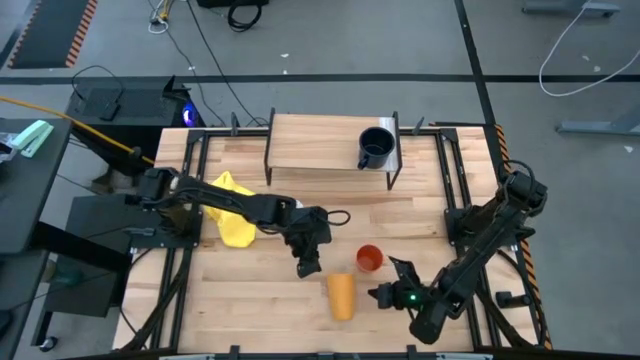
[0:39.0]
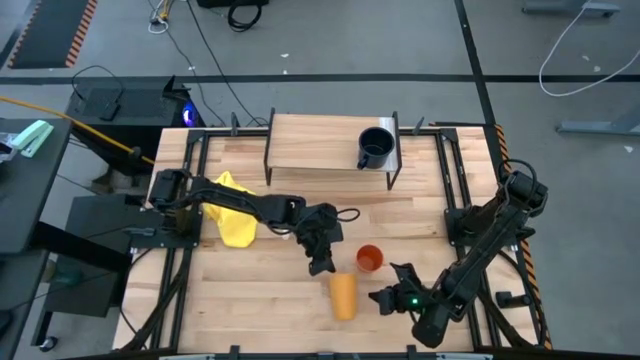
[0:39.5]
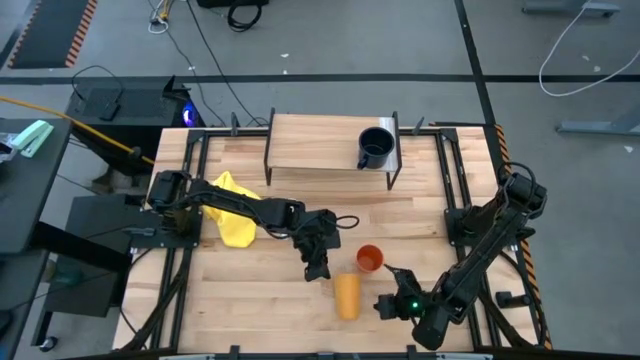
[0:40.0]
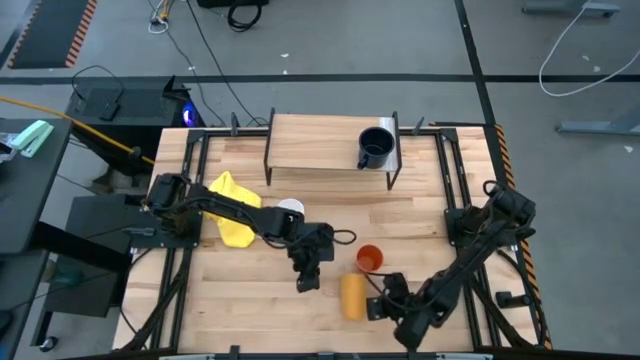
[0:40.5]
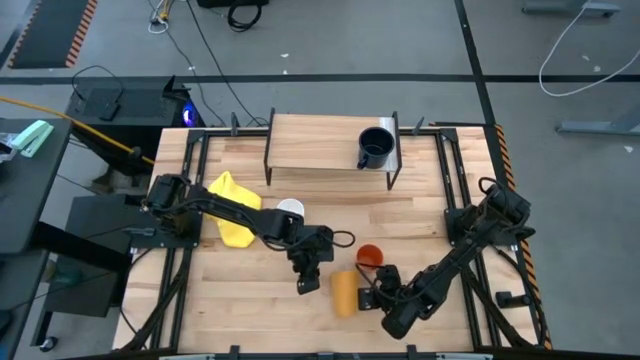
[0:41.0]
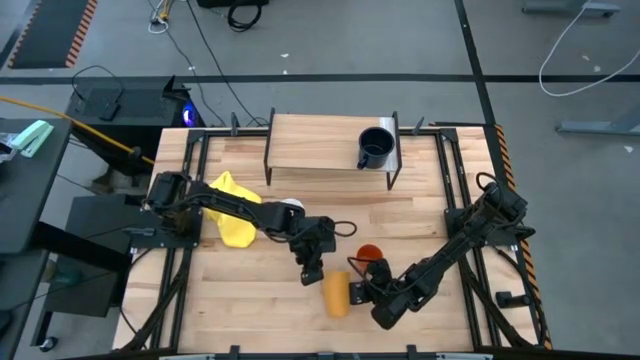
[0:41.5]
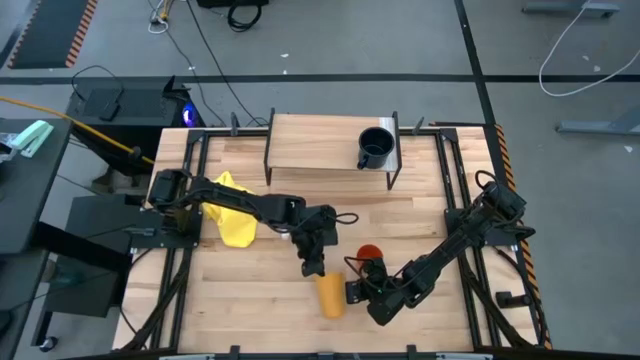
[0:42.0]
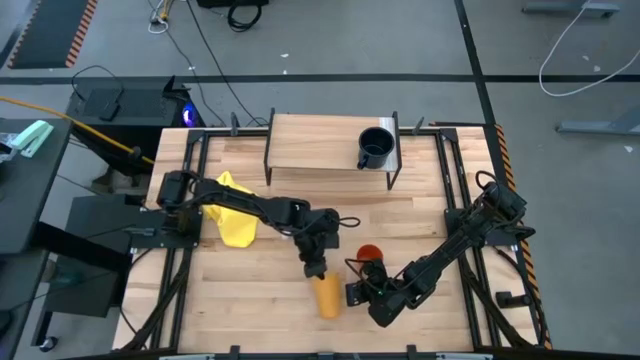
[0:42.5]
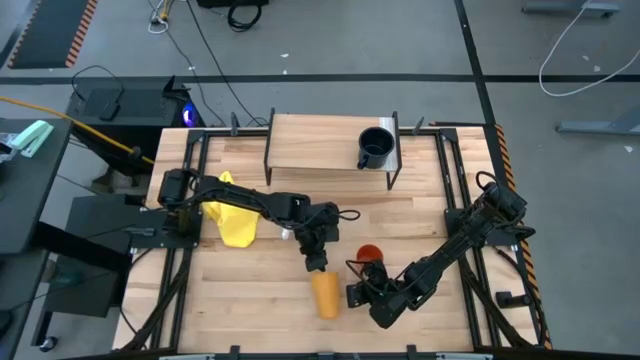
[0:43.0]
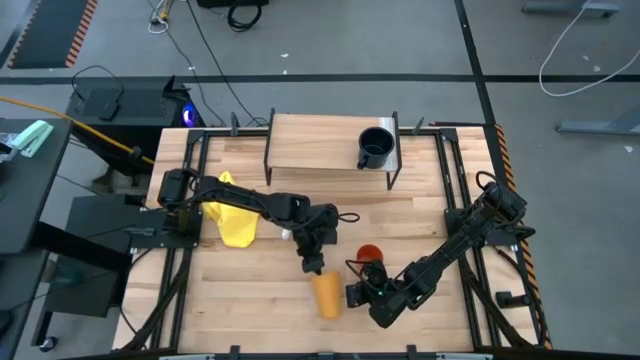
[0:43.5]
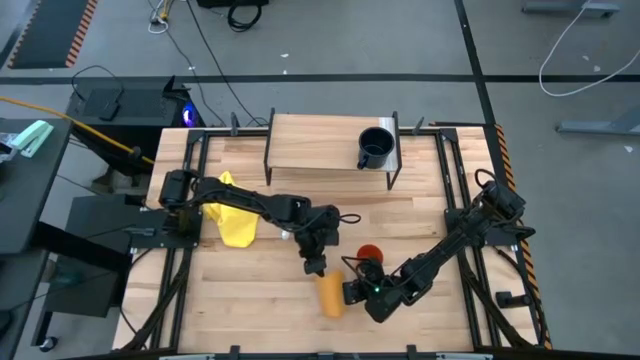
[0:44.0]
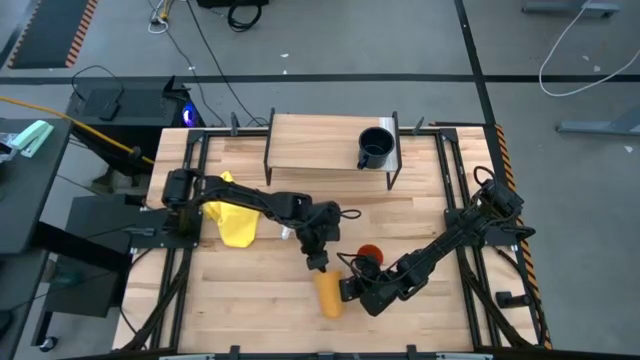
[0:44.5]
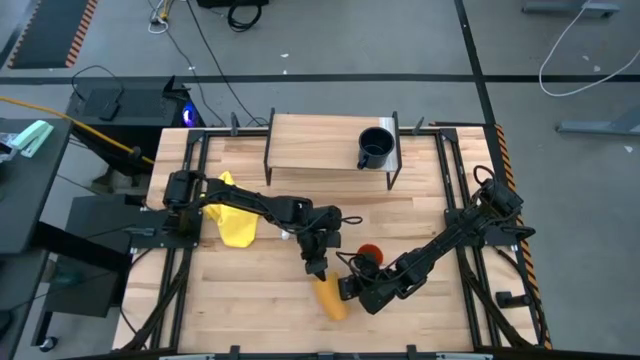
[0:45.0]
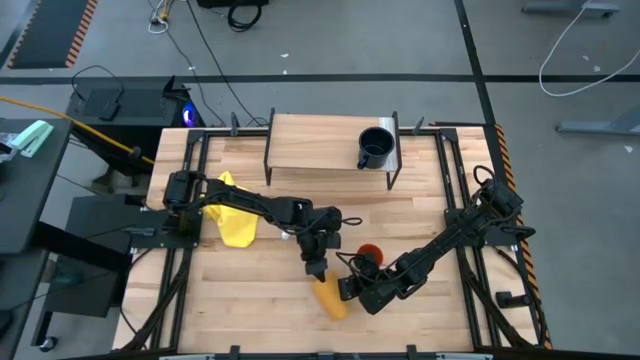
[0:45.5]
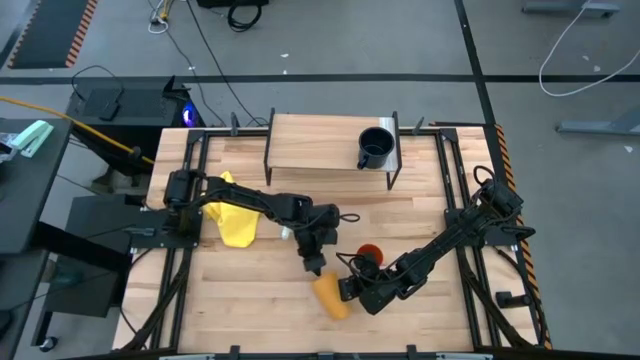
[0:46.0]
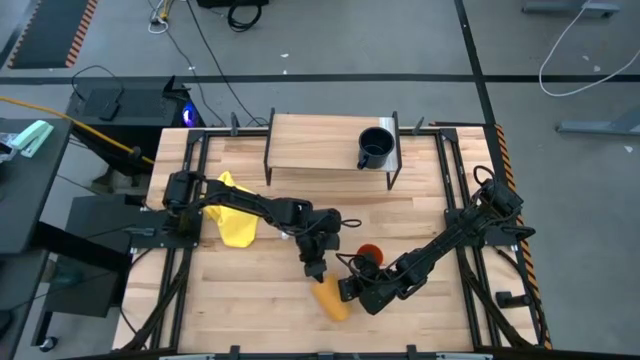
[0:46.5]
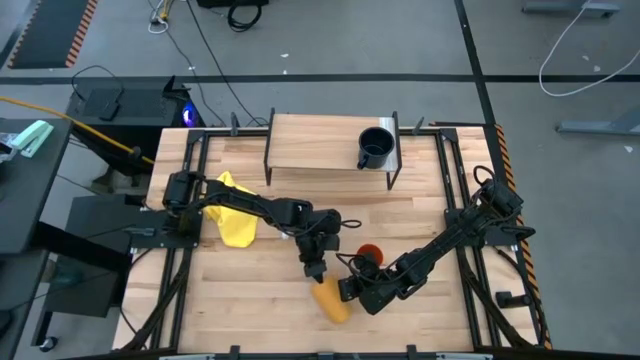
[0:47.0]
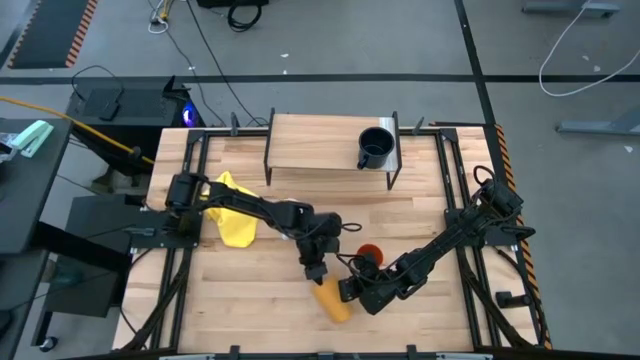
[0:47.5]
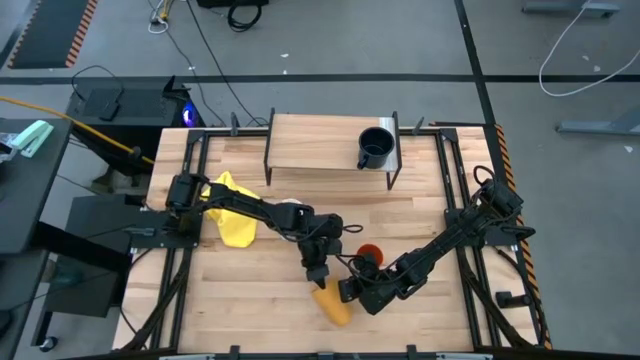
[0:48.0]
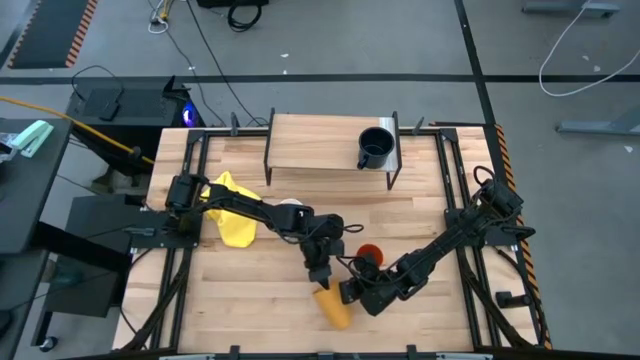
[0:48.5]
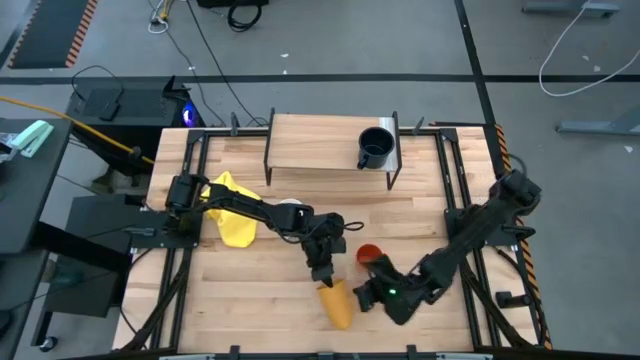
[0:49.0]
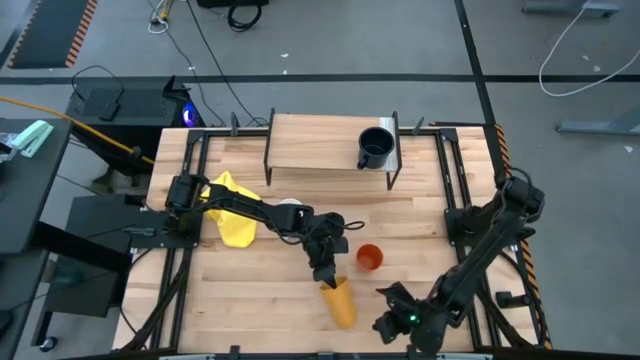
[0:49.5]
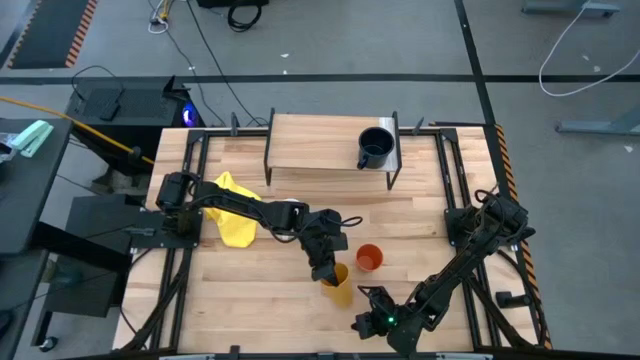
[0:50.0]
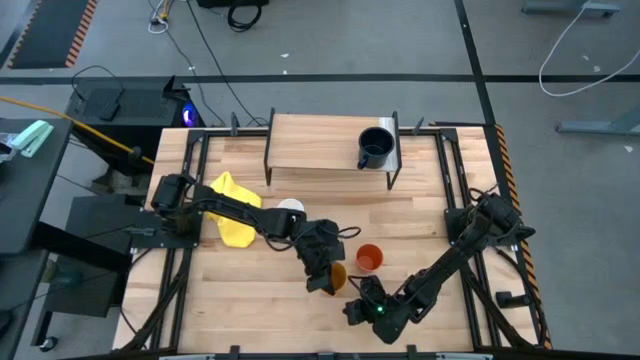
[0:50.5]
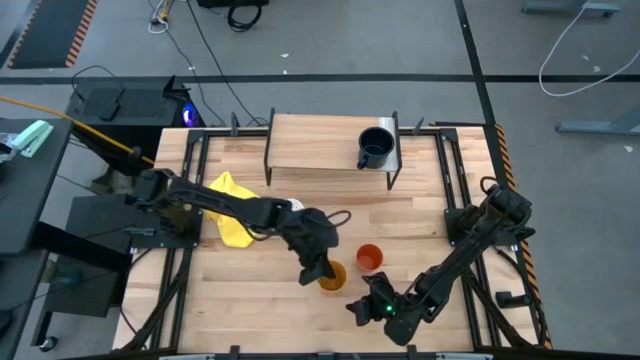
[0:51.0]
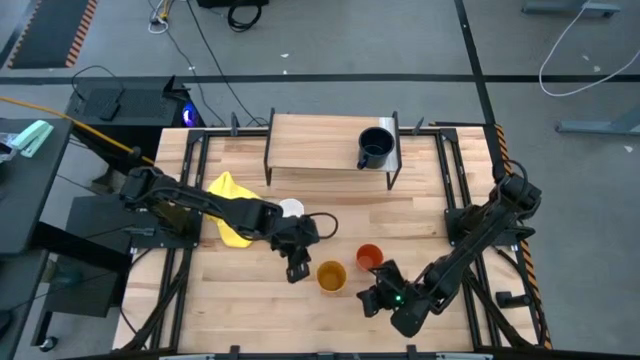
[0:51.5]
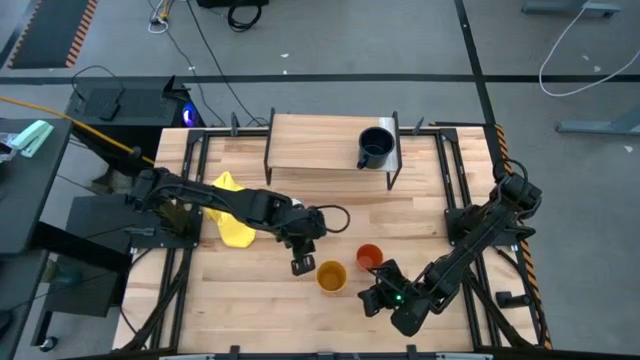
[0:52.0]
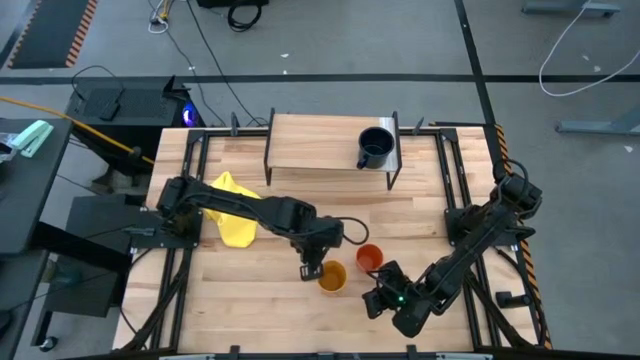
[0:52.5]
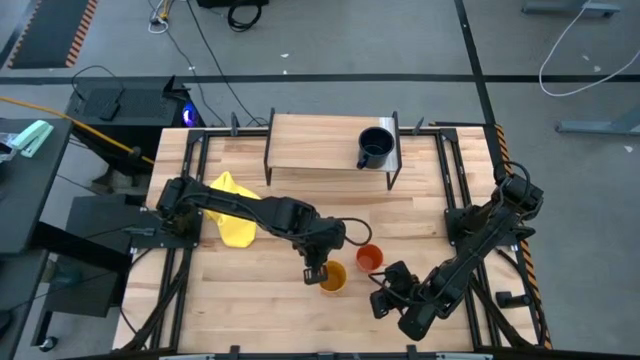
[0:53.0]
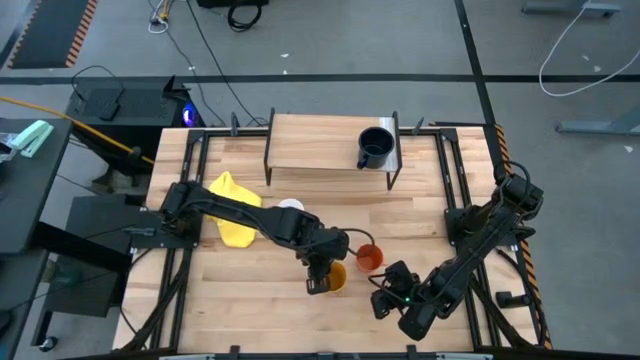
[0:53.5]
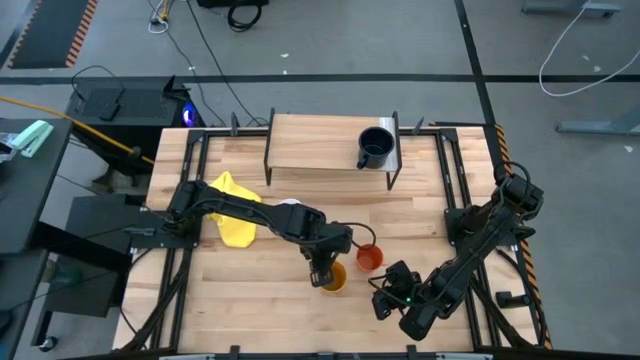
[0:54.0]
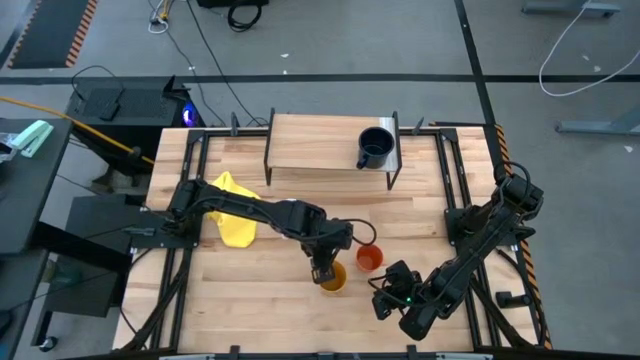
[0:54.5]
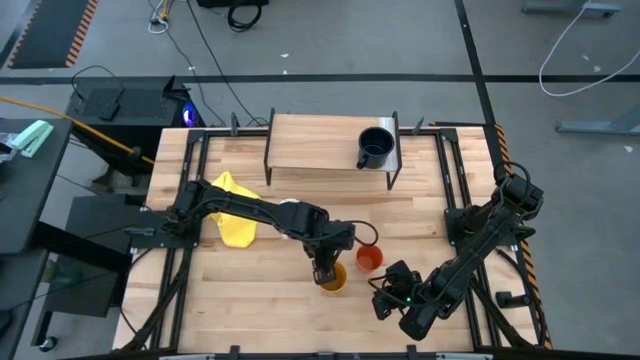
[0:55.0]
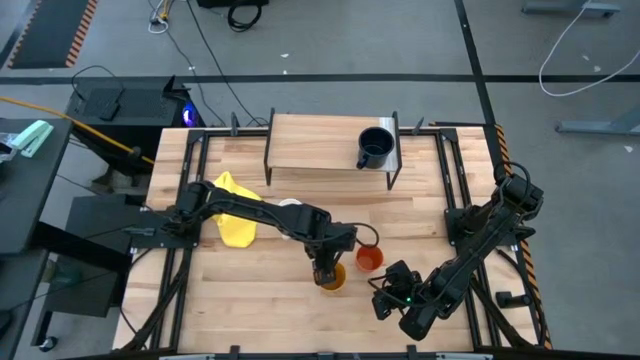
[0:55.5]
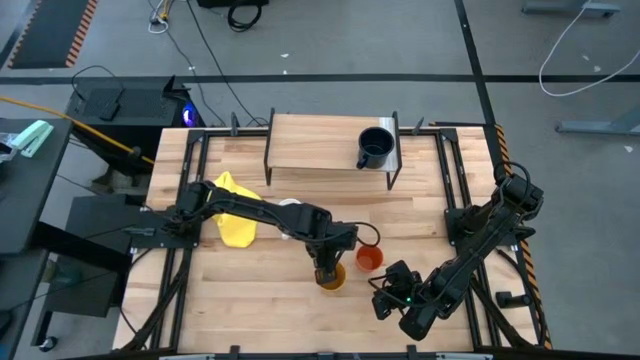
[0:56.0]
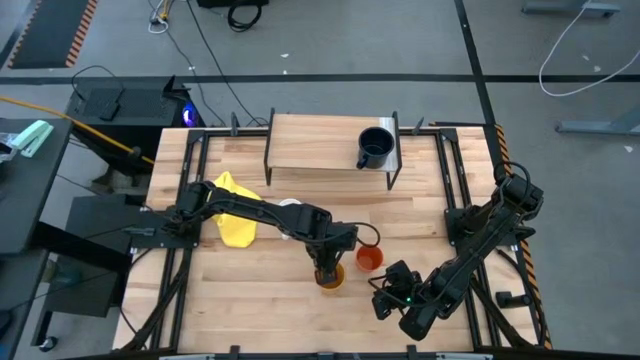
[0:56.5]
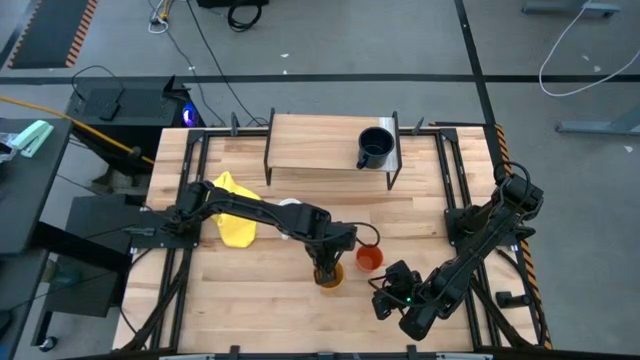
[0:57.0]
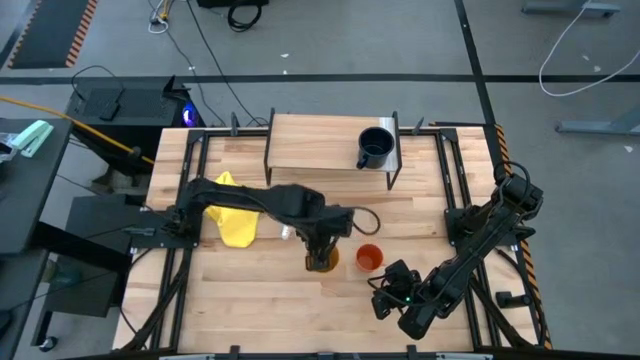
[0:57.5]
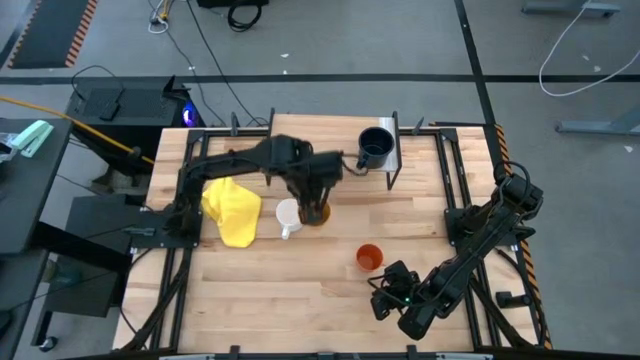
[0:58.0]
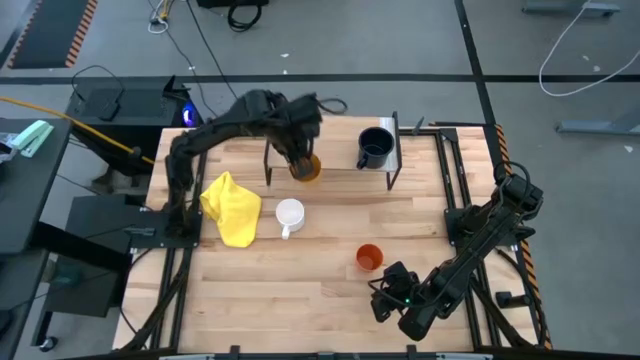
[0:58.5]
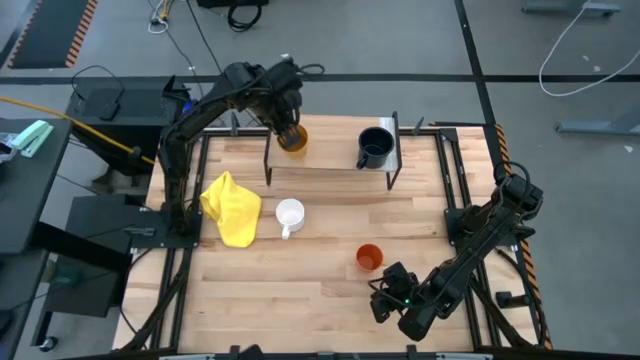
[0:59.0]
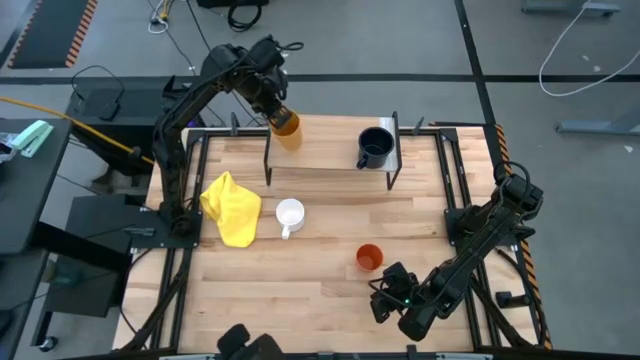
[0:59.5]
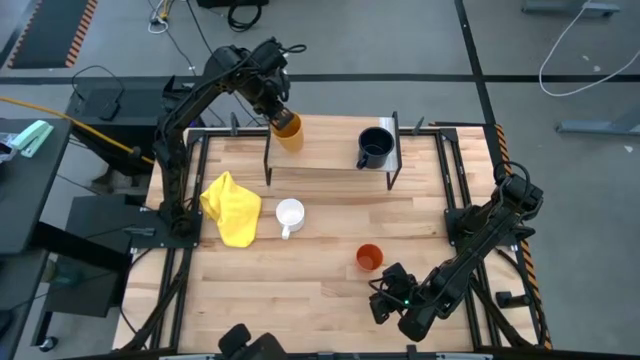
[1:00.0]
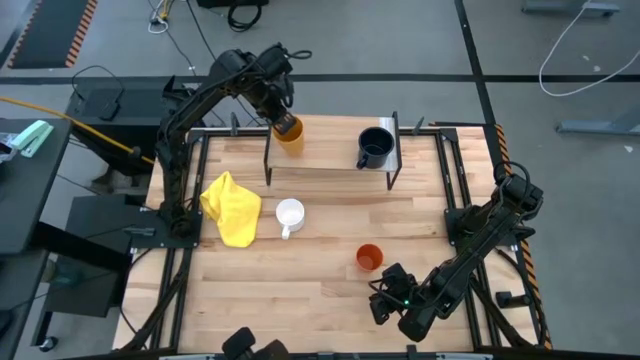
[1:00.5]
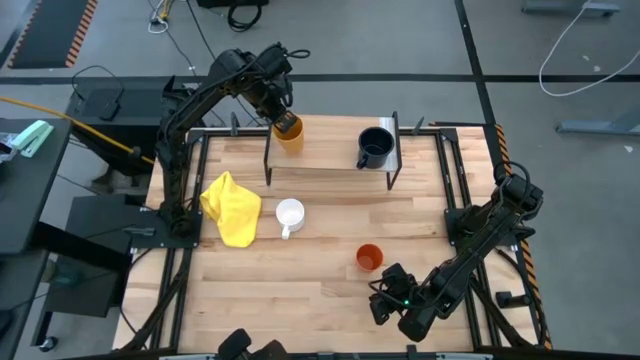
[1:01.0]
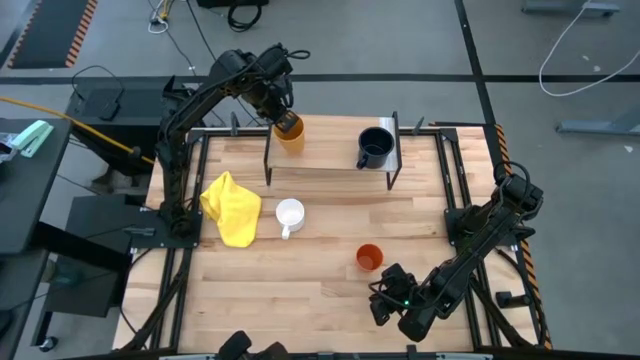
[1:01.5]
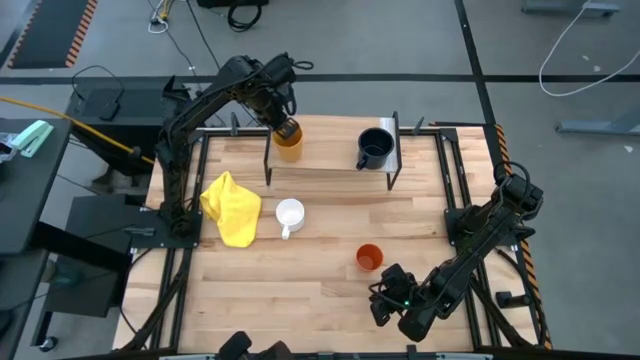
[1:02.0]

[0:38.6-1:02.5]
Task: Stack small to large cups/mugs on shelf
Put the yellow cup on the shelf
